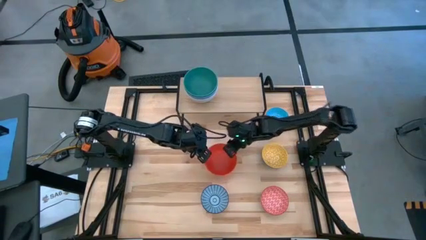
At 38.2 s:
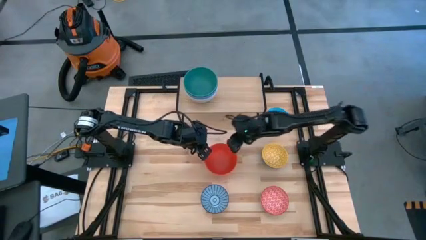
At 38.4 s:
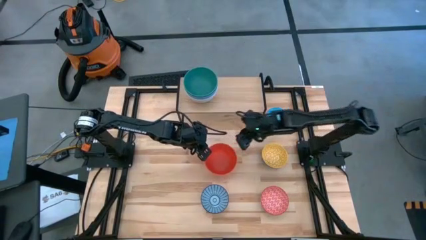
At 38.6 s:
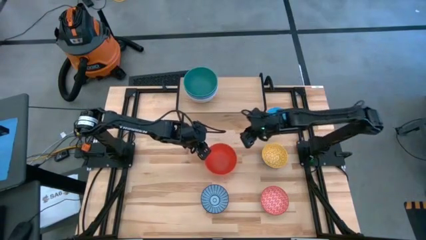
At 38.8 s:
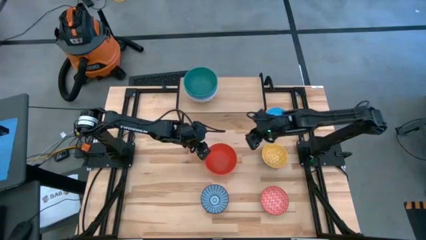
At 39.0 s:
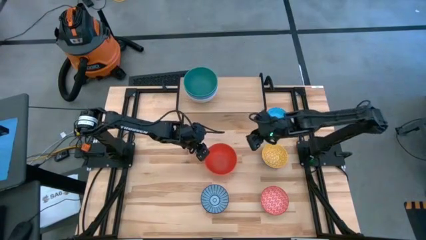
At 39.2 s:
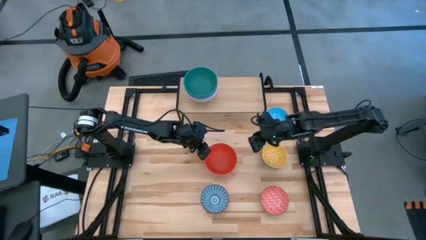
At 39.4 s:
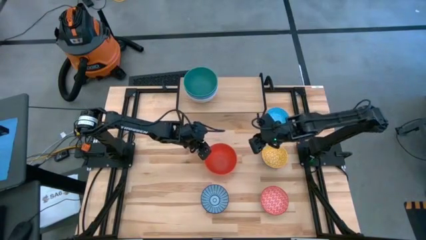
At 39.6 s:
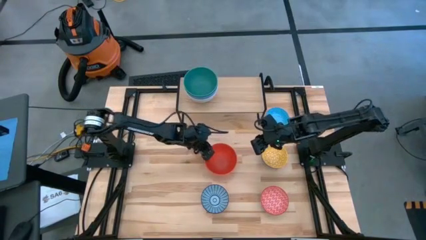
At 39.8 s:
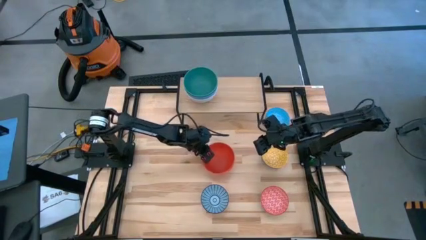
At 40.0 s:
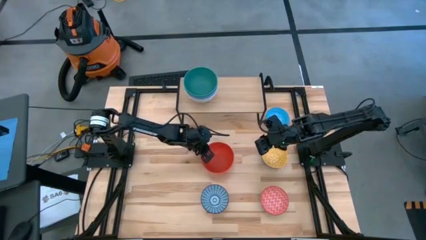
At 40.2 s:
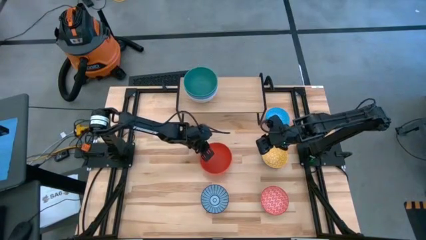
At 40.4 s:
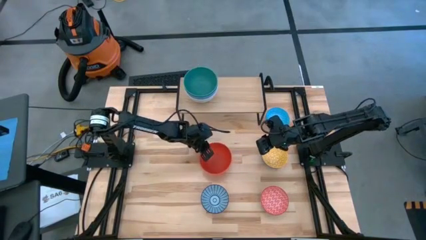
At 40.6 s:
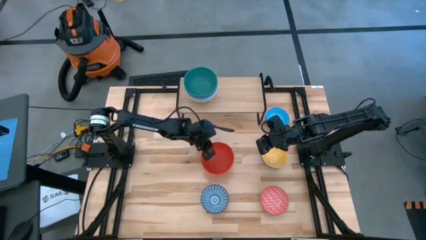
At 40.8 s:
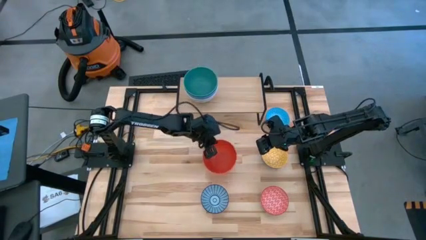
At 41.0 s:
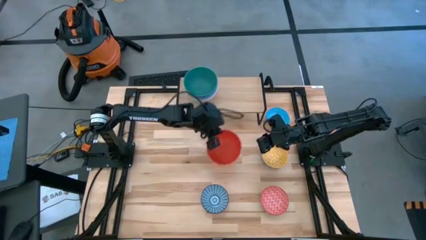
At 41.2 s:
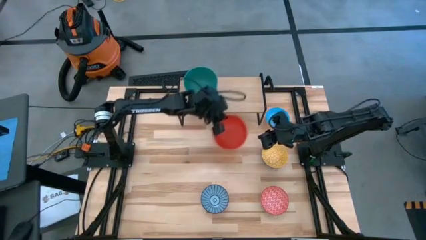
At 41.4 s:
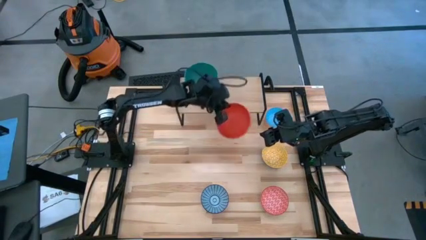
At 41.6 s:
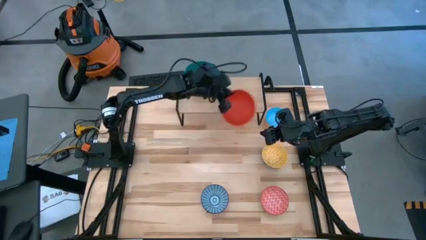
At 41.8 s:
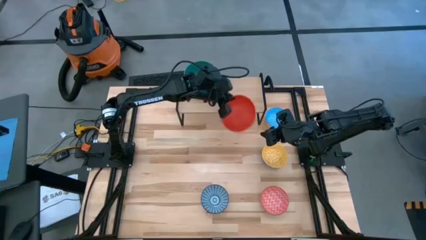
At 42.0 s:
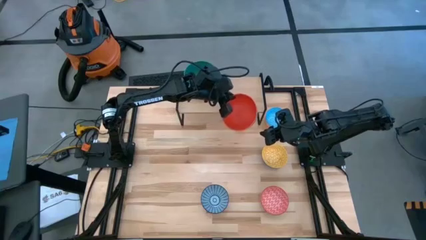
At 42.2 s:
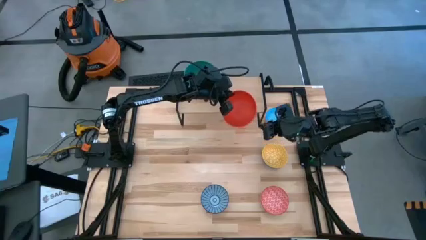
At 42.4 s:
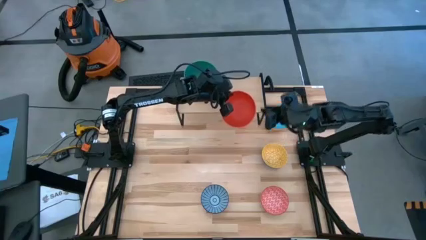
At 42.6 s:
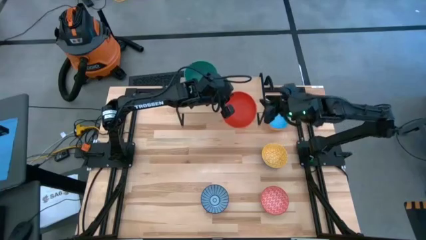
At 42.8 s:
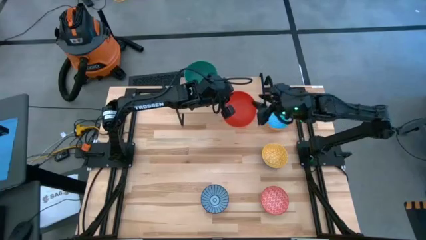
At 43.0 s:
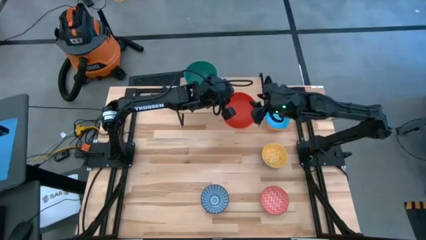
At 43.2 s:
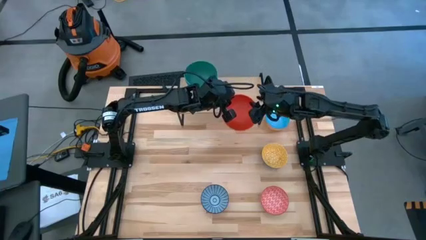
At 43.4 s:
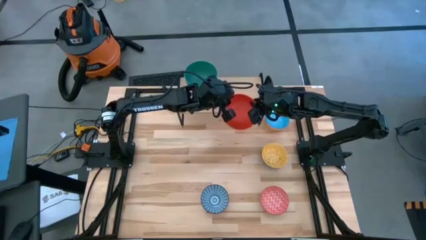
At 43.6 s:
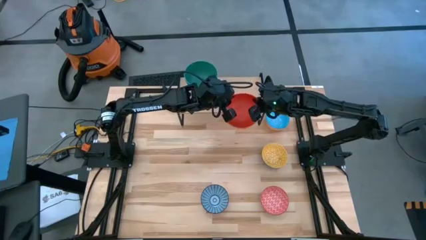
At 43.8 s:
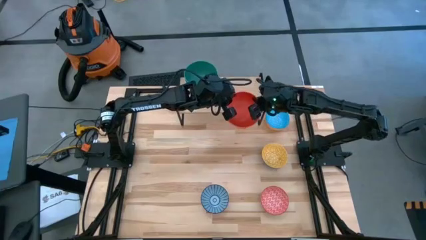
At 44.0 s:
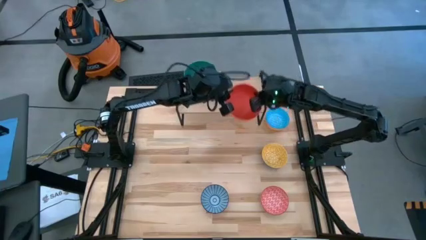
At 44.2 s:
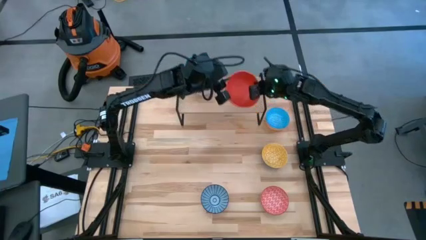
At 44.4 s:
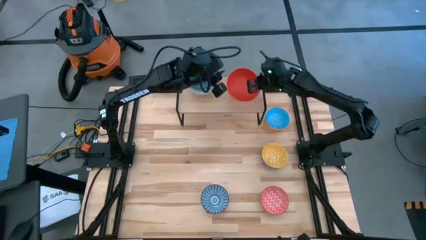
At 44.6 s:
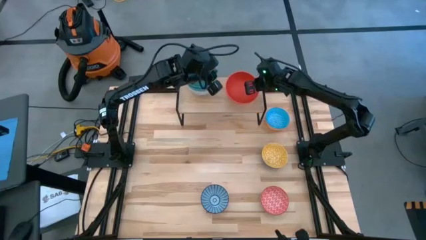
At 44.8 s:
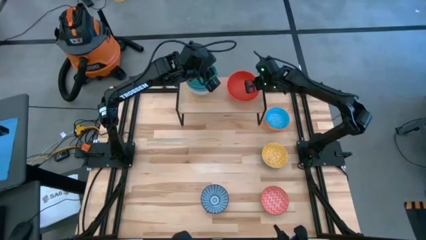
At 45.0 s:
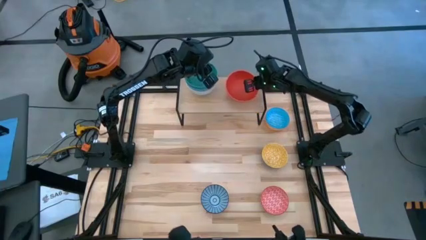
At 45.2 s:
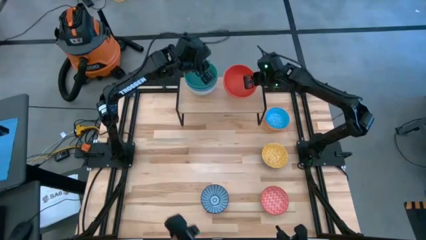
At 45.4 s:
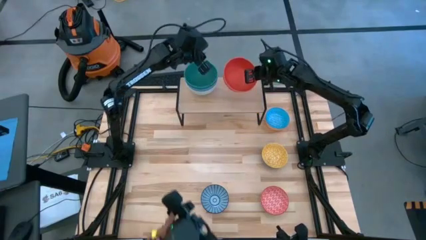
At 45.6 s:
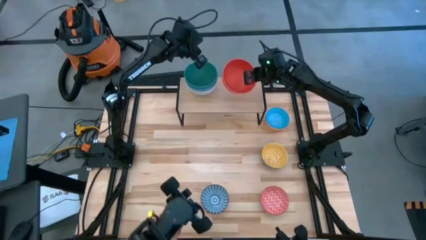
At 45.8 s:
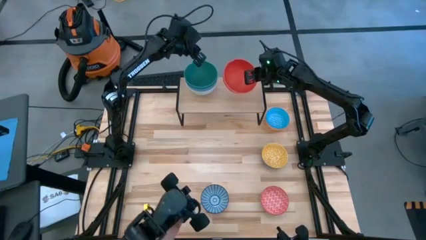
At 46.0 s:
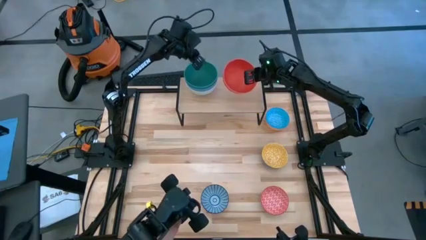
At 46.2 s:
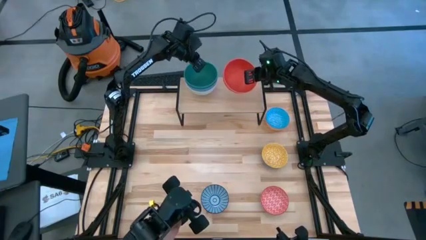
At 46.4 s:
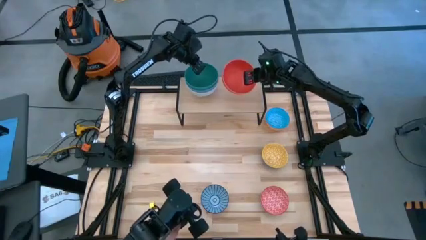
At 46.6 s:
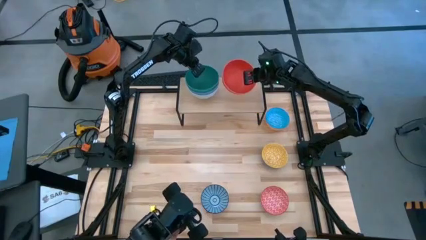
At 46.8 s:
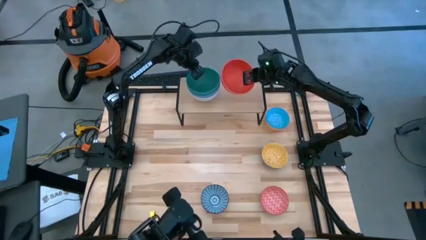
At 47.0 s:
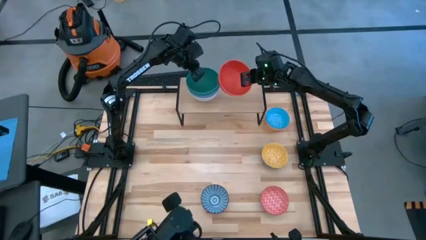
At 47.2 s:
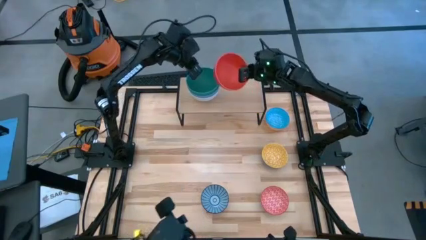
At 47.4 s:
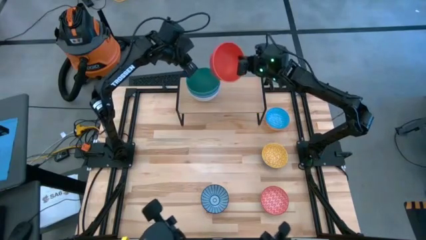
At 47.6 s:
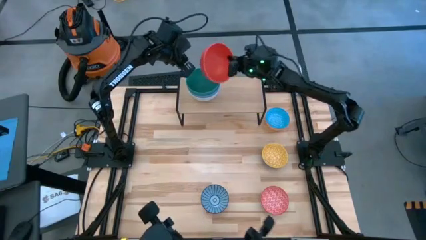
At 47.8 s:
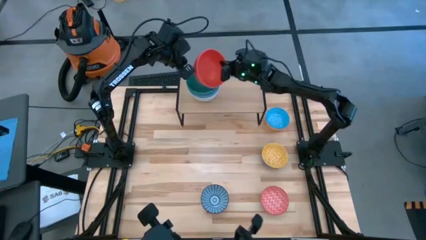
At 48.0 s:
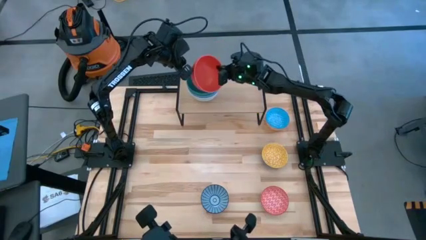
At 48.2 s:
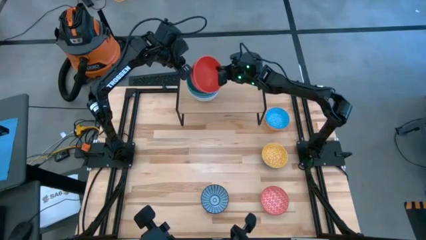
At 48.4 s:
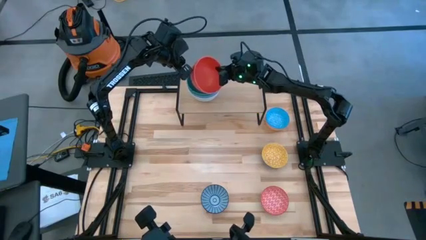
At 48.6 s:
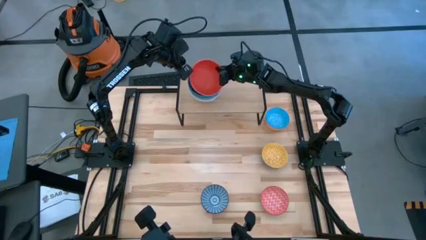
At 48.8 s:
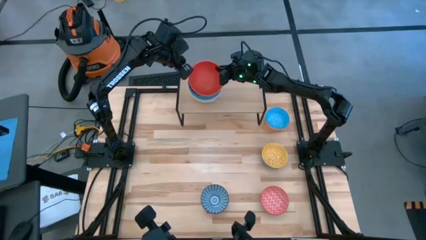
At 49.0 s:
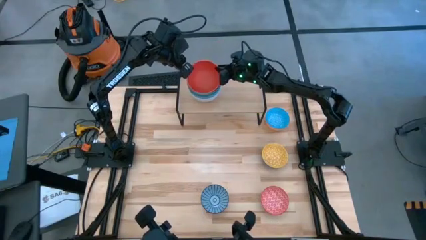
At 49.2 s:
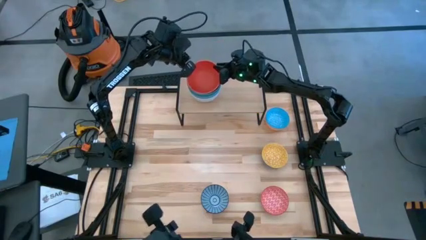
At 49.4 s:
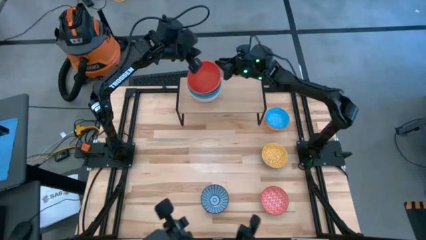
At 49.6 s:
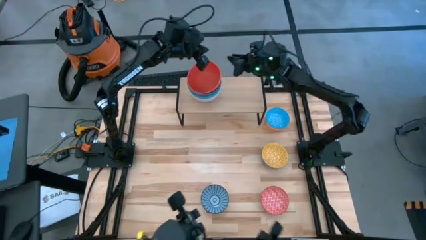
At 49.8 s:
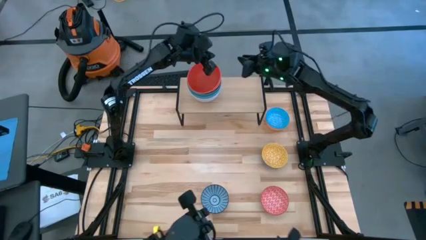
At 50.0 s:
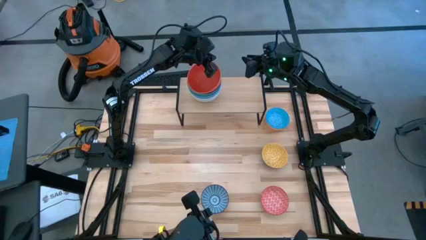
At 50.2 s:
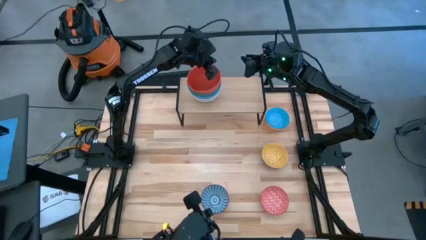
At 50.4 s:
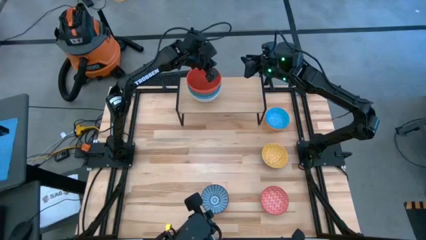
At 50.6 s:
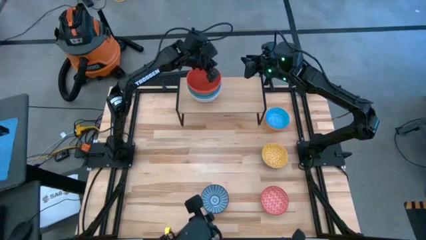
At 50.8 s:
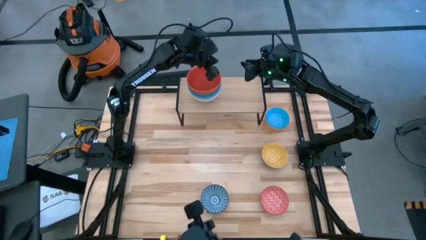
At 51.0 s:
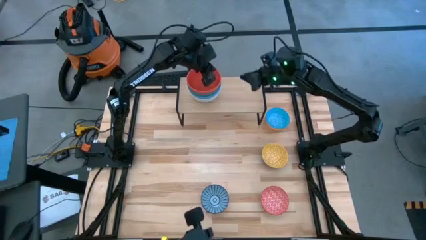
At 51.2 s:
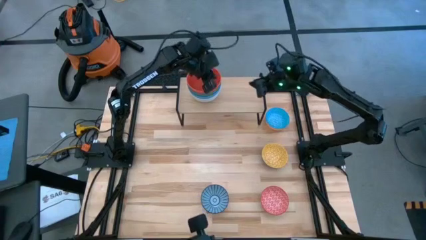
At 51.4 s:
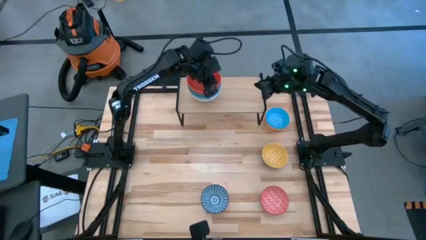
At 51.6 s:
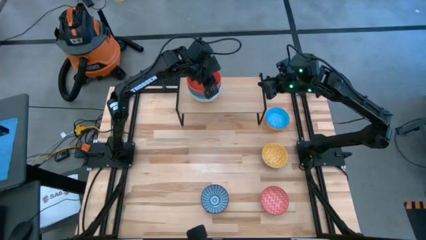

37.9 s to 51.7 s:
Task: Place and stack bowls onto a shelf
Stack the orange bowl on top of the green bowl on the shelf

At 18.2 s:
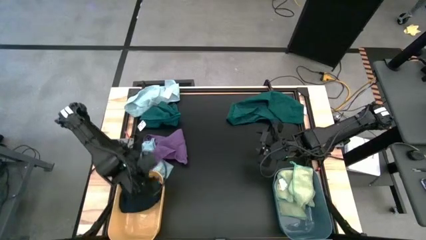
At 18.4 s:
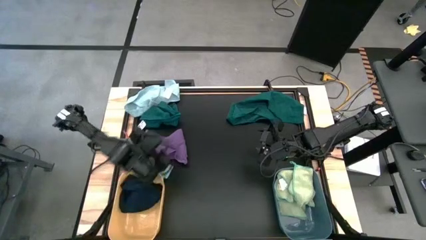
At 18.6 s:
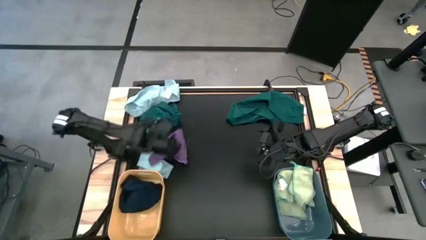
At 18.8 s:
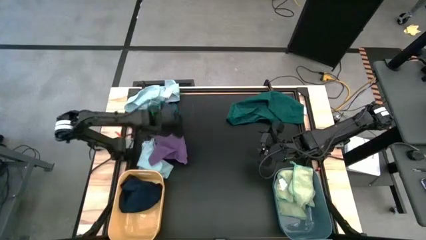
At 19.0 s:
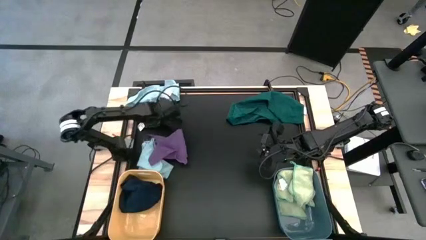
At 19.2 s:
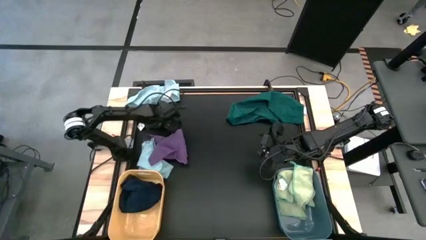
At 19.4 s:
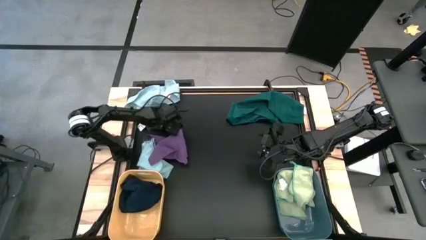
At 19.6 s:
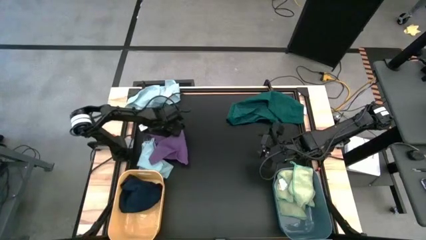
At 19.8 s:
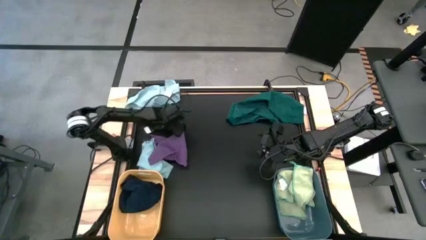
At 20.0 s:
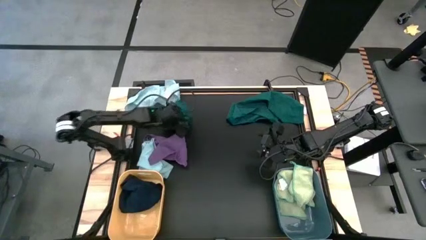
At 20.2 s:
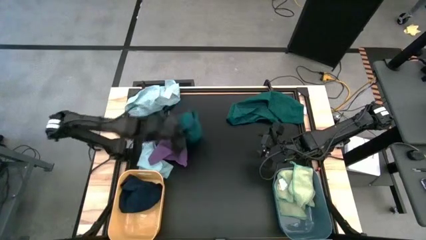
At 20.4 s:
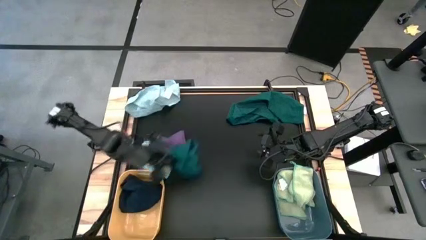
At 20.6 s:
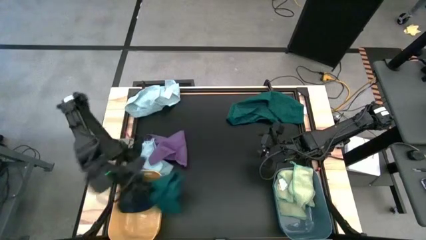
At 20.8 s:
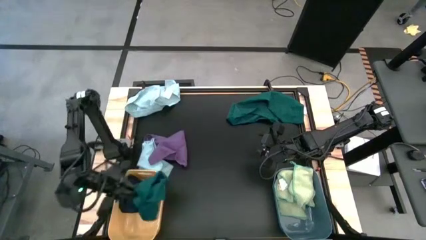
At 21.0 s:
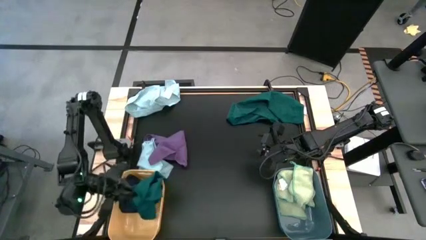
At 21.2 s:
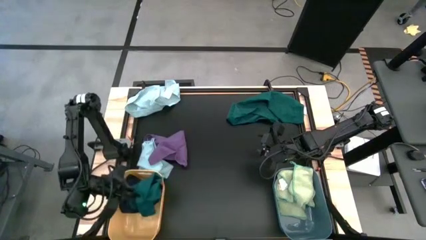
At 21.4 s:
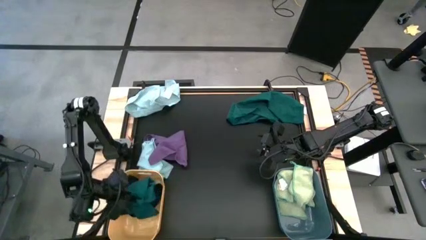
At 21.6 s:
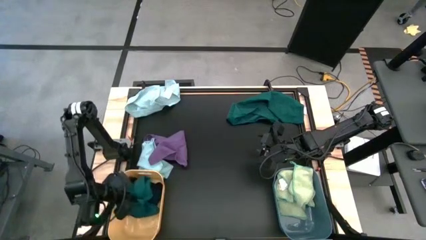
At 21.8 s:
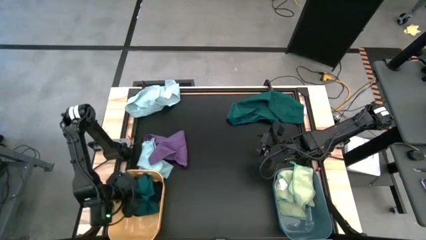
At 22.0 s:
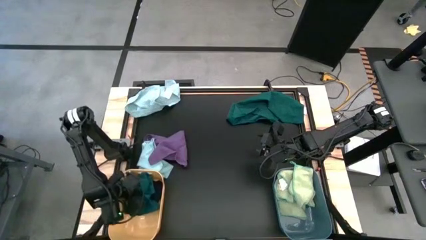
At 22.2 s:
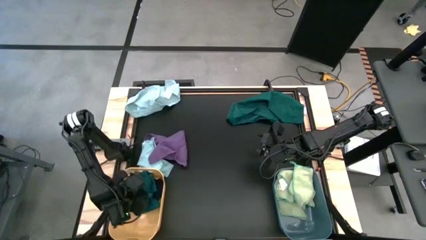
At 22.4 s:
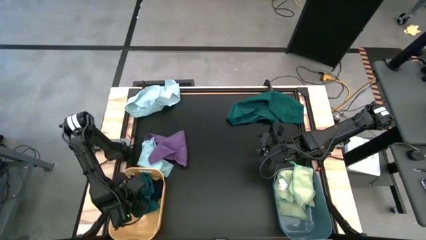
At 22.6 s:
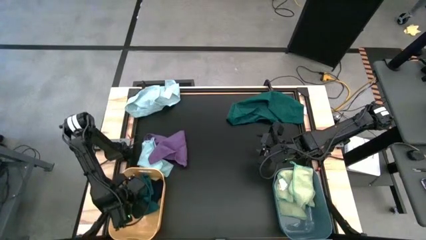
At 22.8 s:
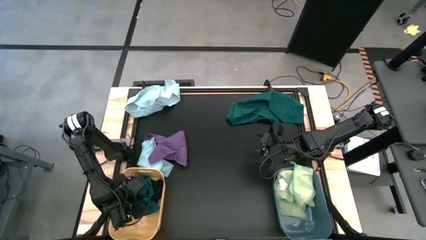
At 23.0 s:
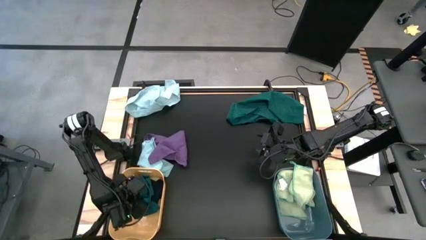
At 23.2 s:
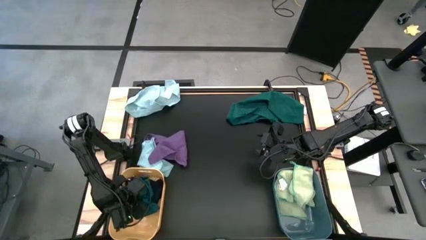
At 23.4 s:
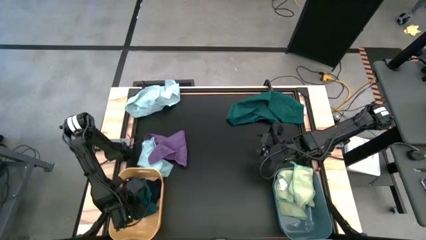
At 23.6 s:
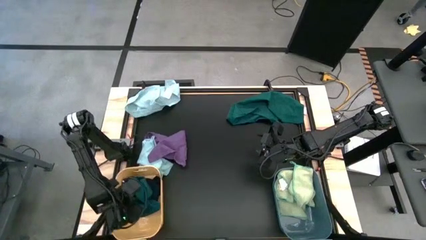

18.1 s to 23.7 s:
Task: Sort microfiber towel by color & place in baskets
Put the left dark green microfiber towel into the yellow bin
